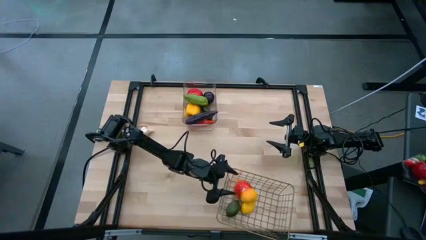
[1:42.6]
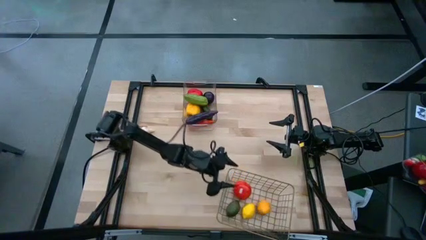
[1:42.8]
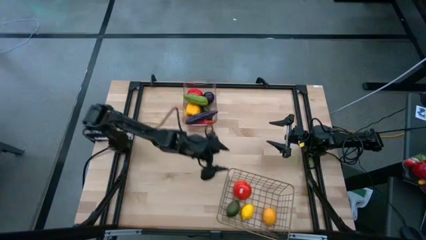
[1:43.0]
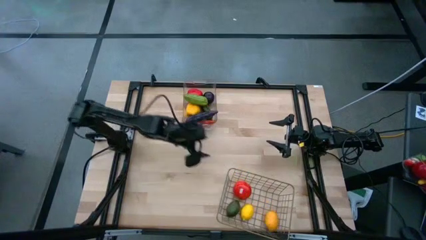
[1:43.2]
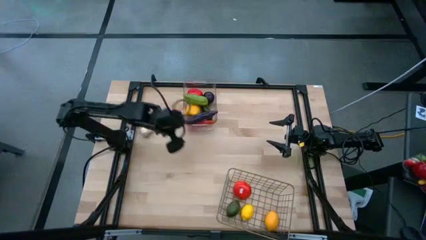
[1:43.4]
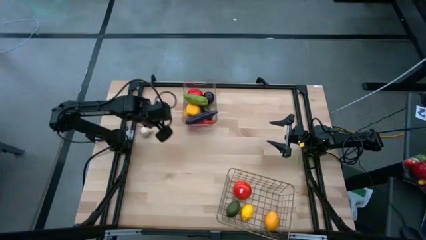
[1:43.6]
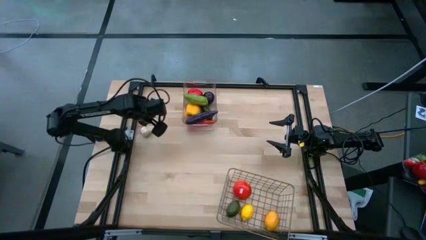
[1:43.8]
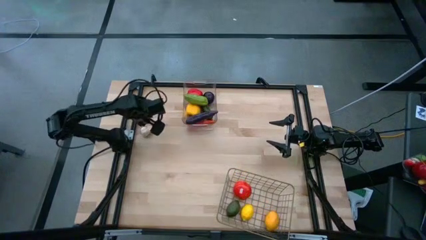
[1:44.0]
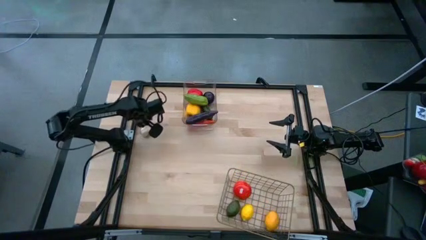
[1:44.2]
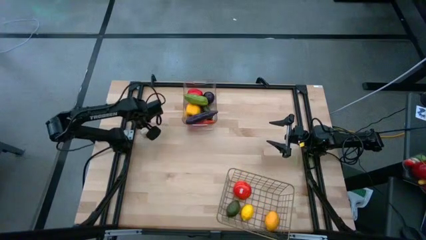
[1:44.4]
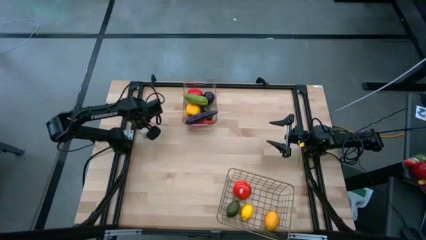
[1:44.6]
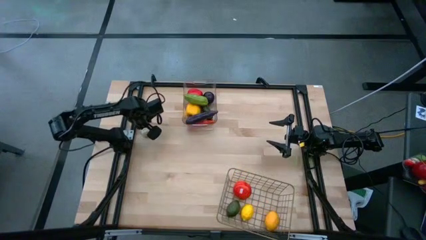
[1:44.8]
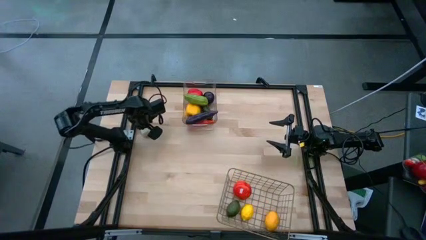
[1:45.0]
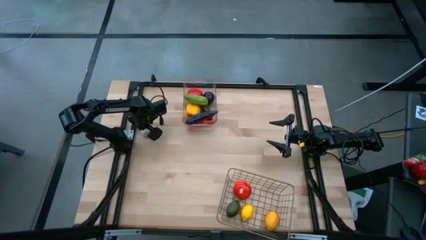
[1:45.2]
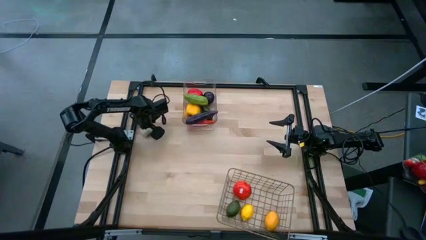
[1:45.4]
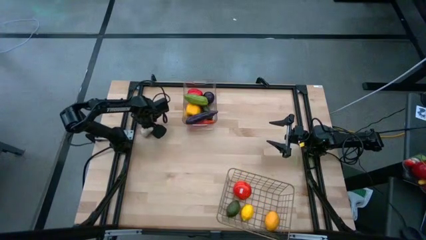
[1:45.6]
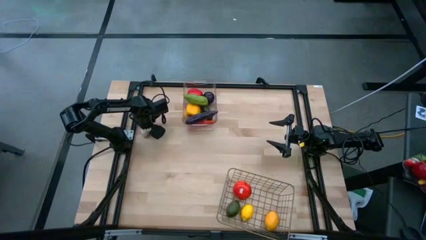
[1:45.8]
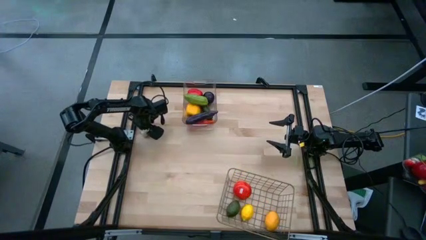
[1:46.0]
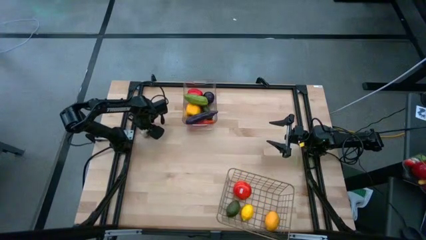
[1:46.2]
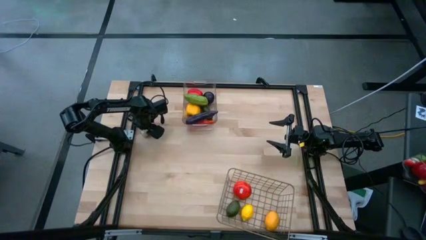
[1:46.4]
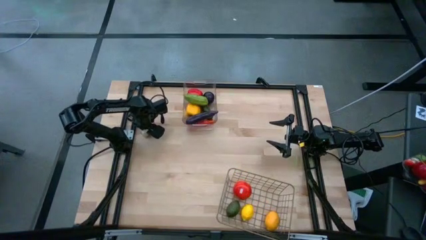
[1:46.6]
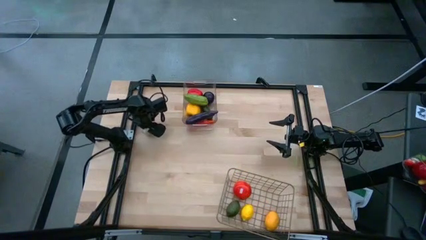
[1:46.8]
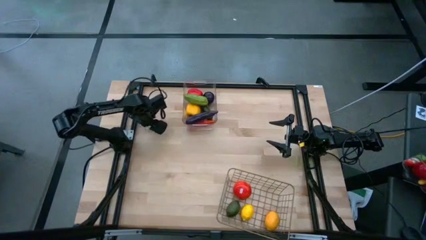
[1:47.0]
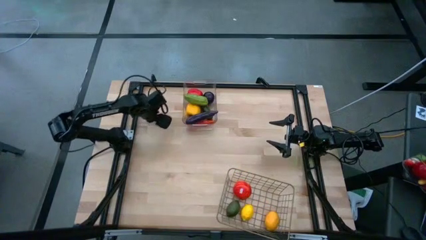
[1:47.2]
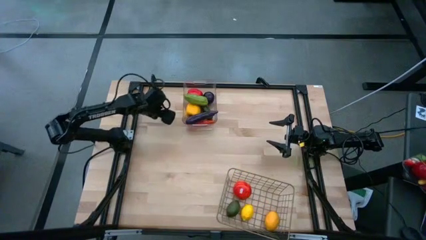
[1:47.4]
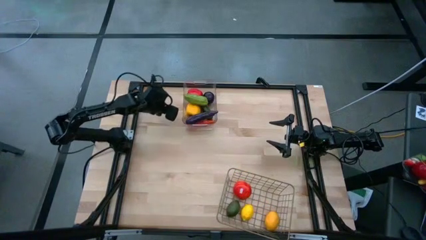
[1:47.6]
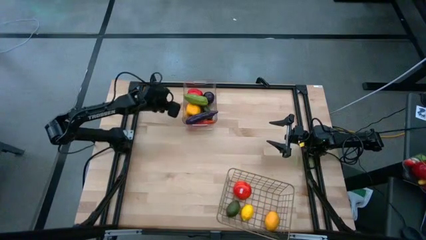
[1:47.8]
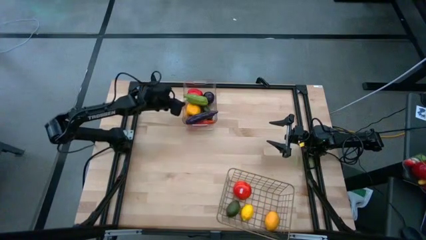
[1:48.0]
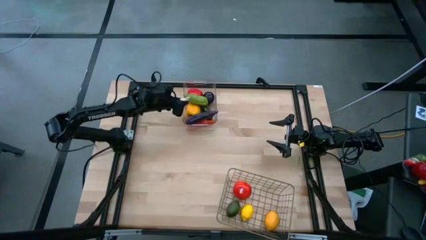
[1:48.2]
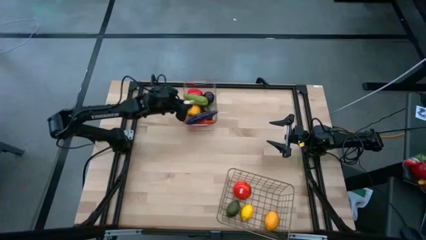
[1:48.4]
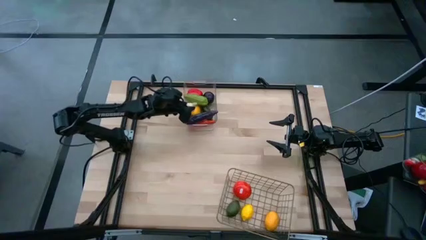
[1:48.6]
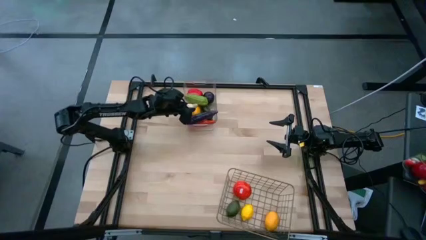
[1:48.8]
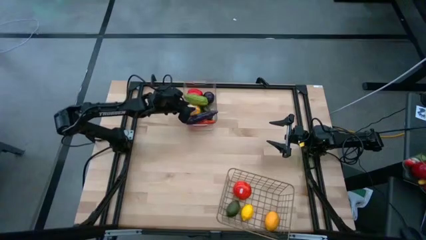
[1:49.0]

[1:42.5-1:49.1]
Task: Sort produce into baskets
Put the white garlic into the transparent bin

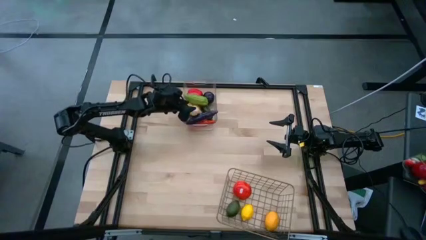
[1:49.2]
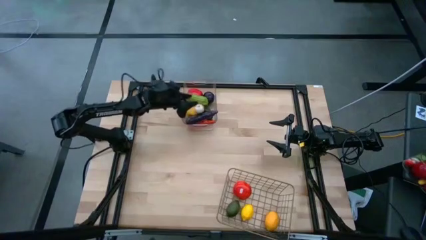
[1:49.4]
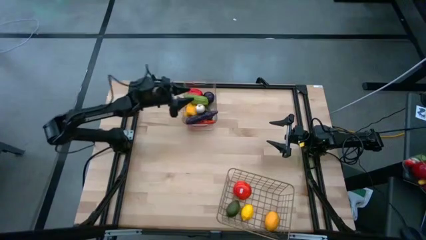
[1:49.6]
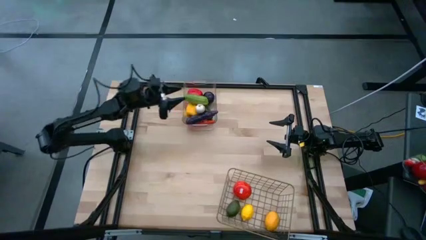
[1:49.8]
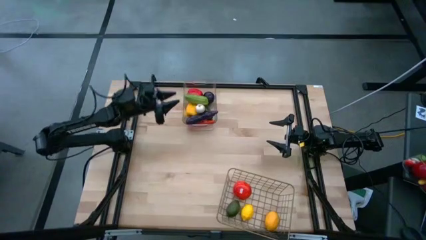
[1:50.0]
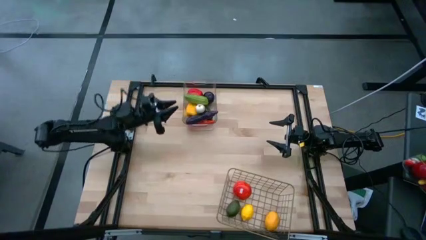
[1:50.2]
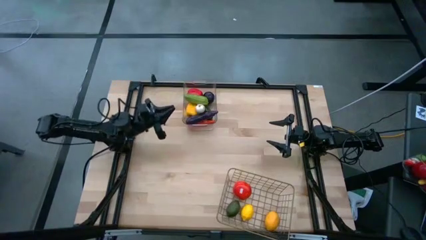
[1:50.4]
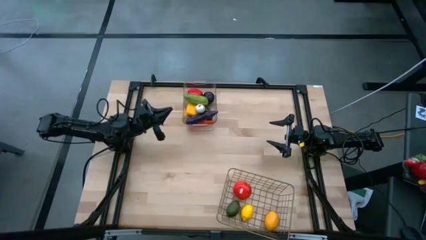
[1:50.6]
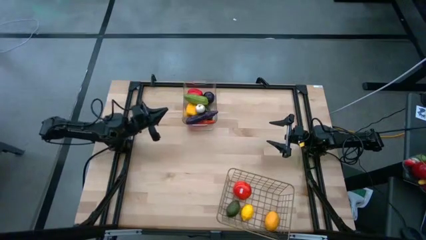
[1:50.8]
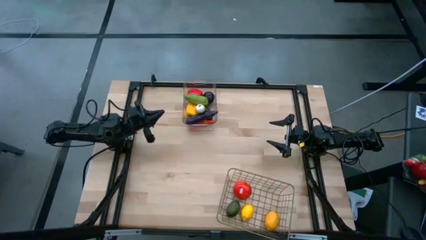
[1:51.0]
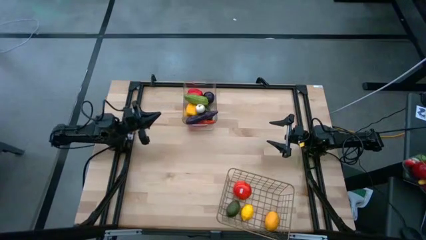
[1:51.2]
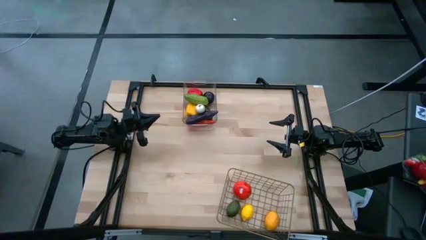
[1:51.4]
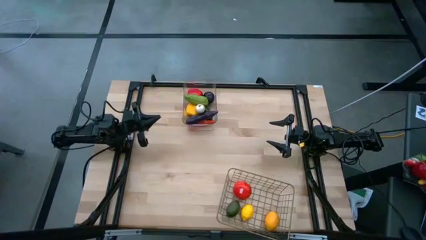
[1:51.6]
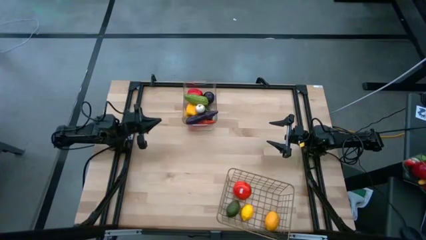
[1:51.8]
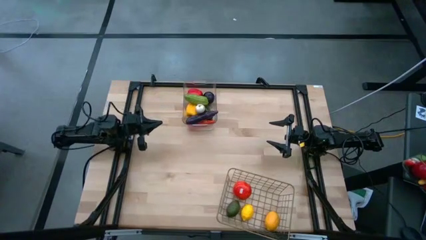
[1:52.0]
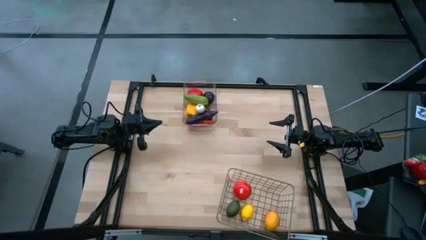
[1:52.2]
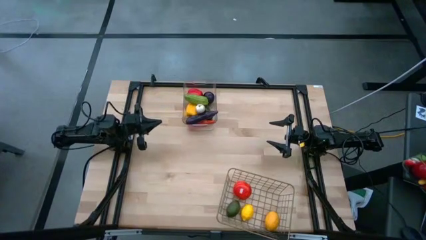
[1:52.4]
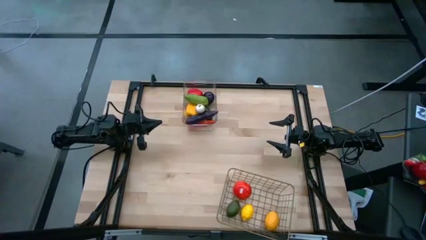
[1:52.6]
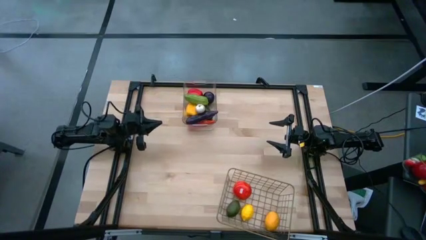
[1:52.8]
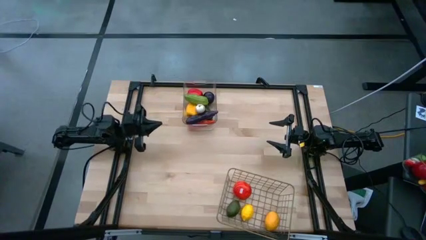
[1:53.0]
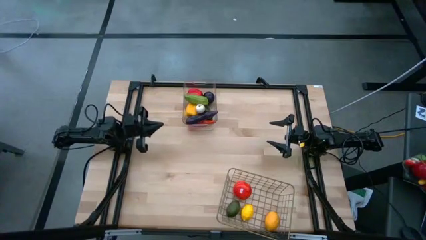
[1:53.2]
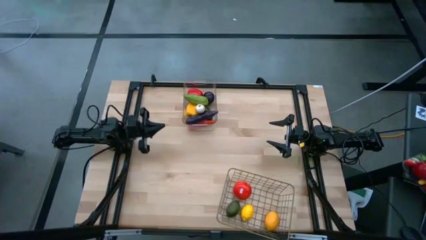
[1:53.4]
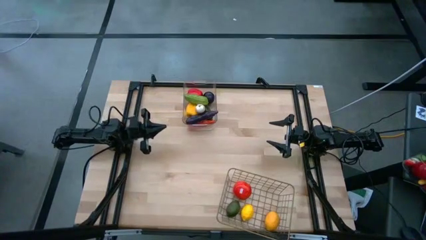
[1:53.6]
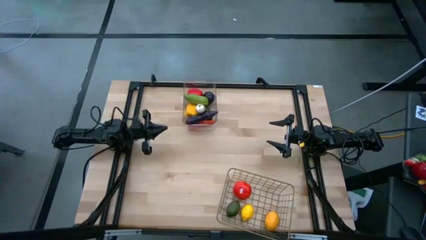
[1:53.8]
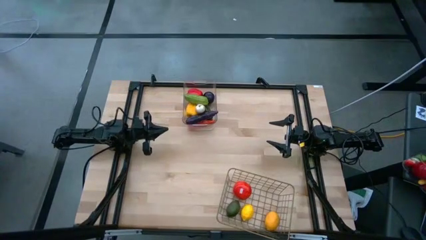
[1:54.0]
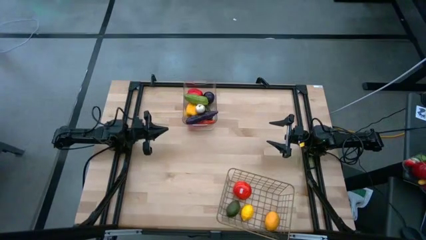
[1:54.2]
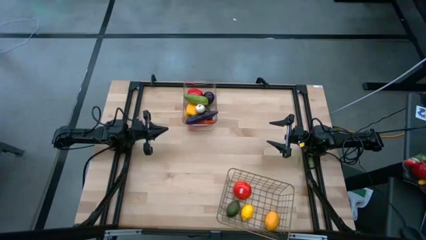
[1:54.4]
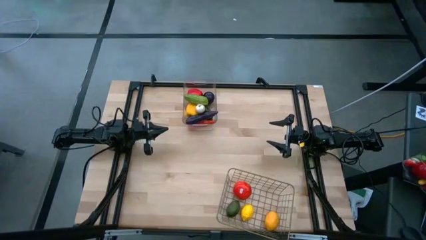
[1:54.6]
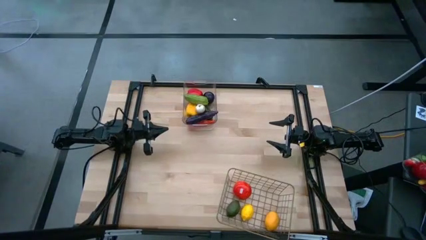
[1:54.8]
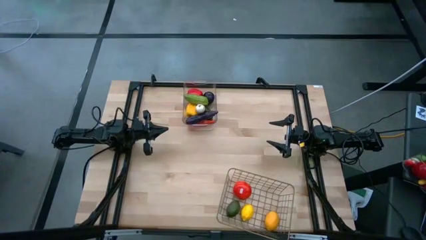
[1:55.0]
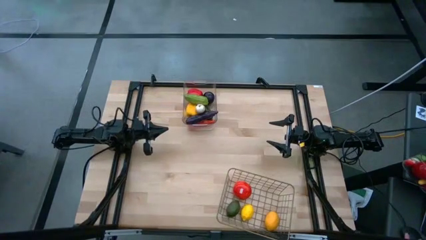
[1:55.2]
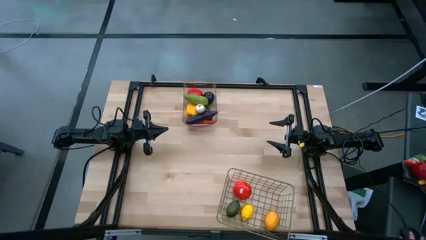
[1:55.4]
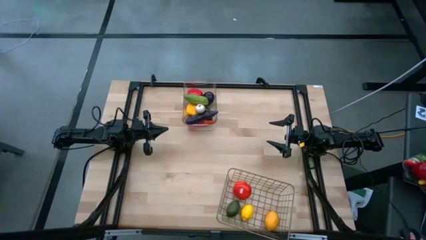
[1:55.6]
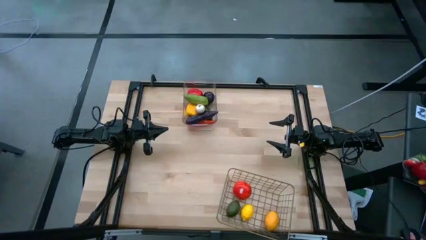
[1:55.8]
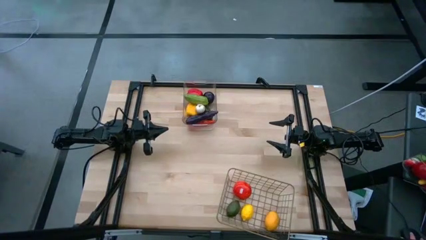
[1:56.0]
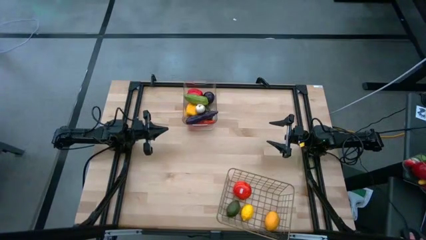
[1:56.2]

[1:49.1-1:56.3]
Return to Home Position

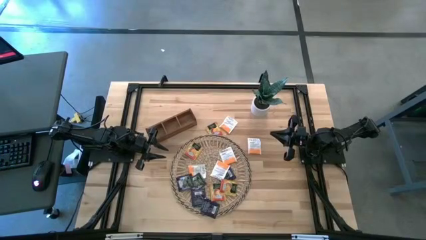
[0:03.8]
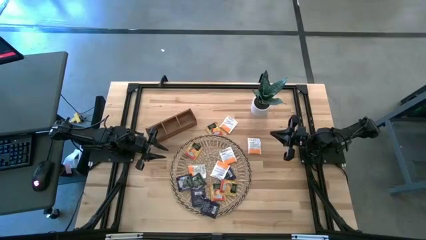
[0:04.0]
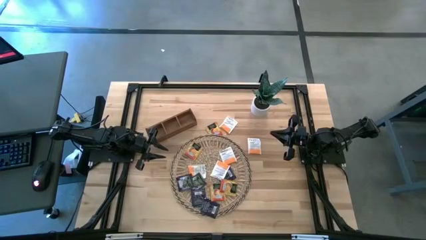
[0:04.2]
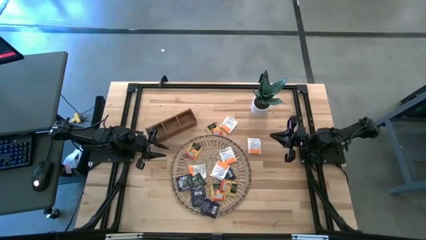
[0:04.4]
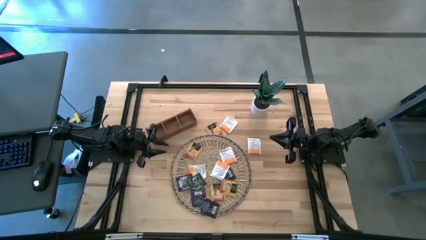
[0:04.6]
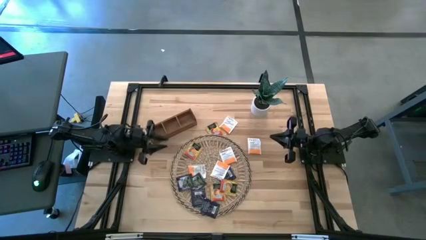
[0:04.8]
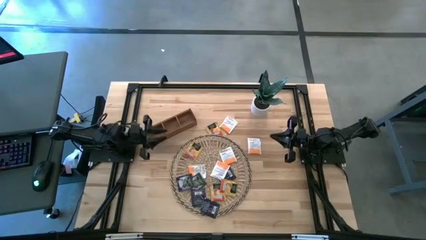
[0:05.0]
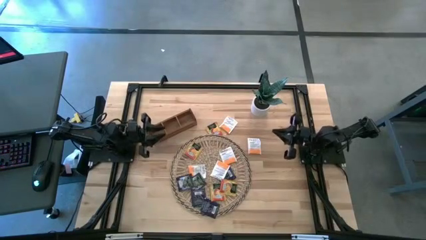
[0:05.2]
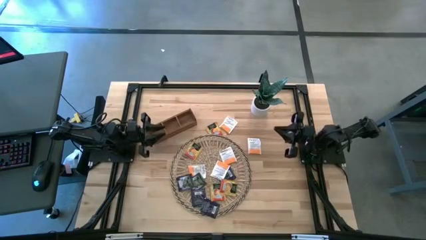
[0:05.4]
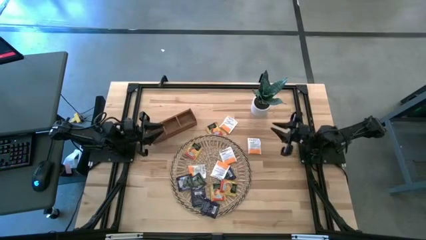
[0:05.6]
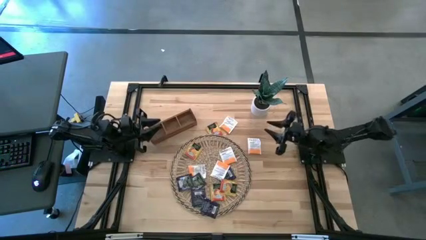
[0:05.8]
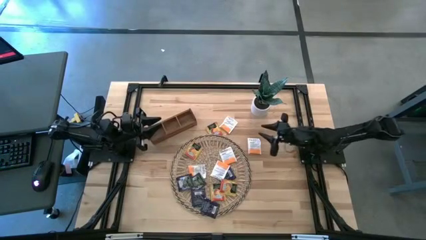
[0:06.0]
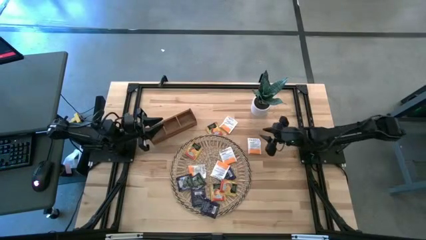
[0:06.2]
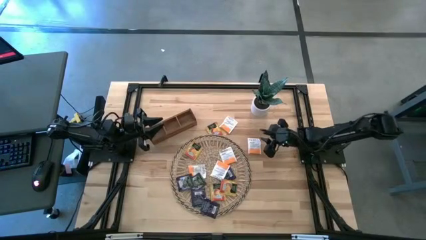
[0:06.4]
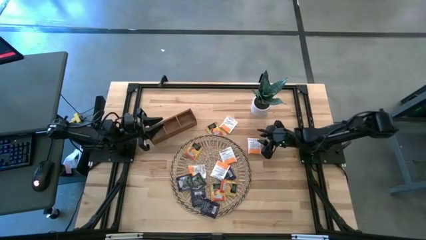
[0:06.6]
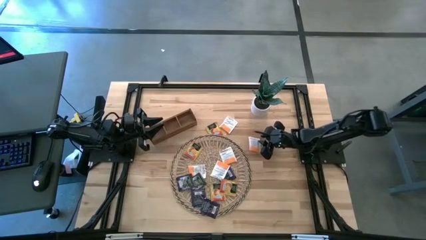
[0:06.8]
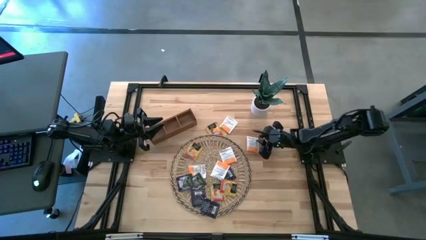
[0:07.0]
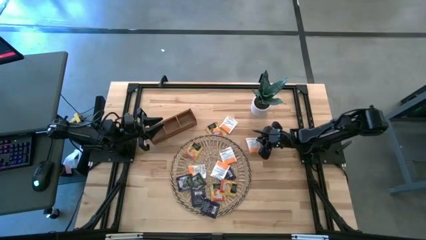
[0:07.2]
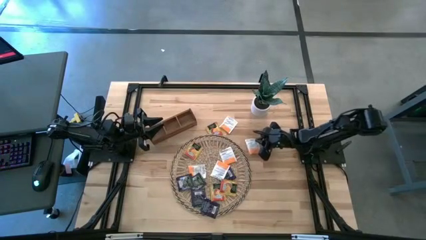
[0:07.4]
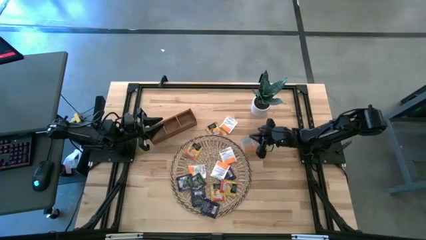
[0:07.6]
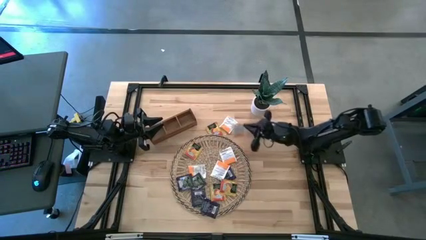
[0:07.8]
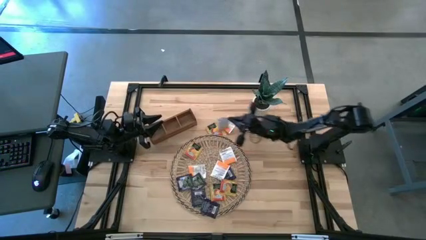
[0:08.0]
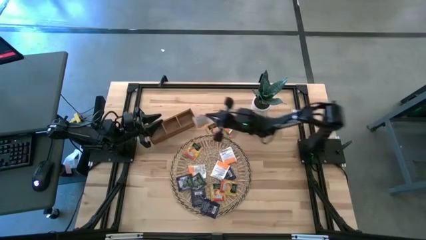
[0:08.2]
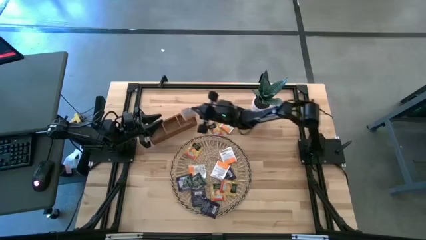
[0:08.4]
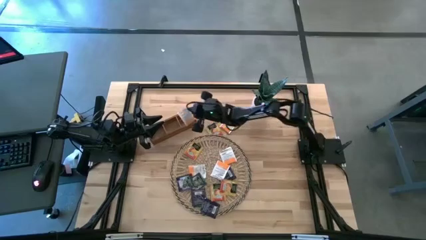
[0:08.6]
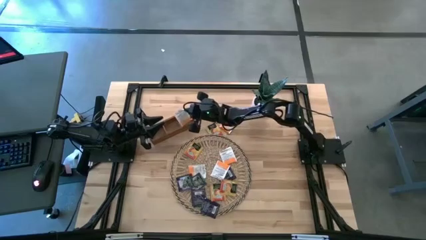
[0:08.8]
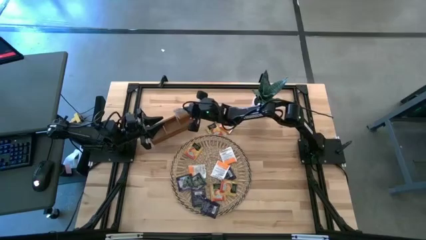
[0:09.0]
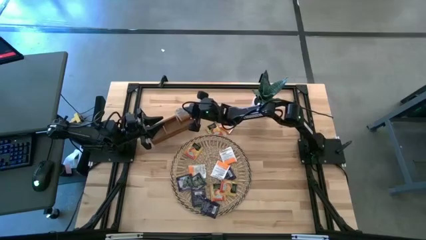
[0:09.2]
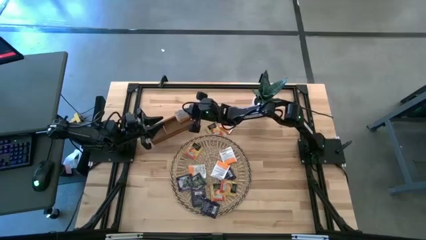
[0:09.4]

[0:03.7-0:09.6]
Task: Pick & Place Tea
Put the white tea bag into the right compartment of the wooden organizer
